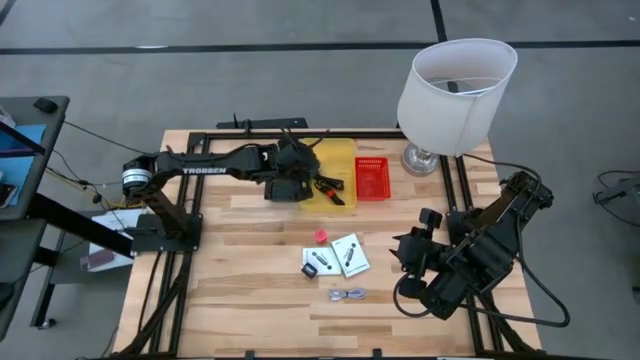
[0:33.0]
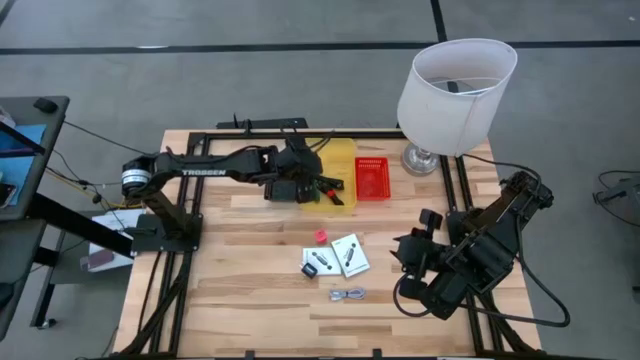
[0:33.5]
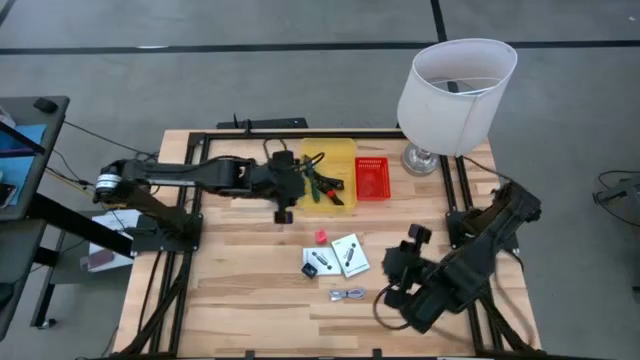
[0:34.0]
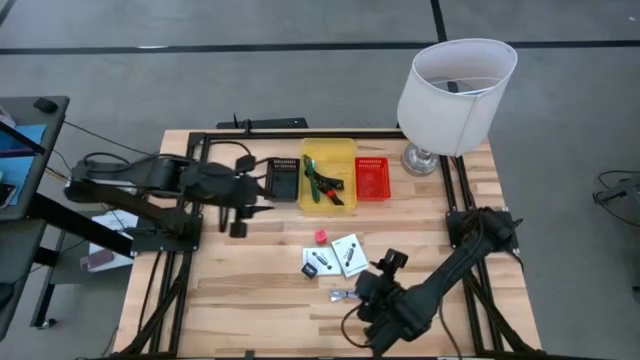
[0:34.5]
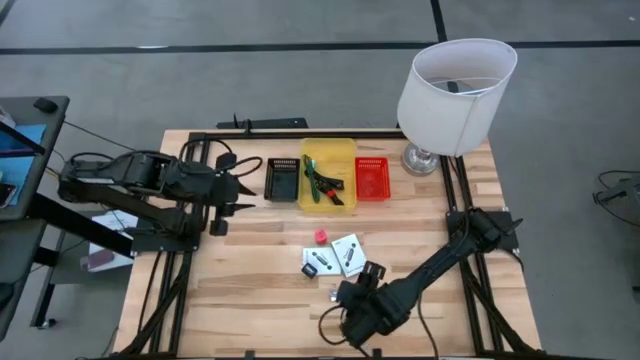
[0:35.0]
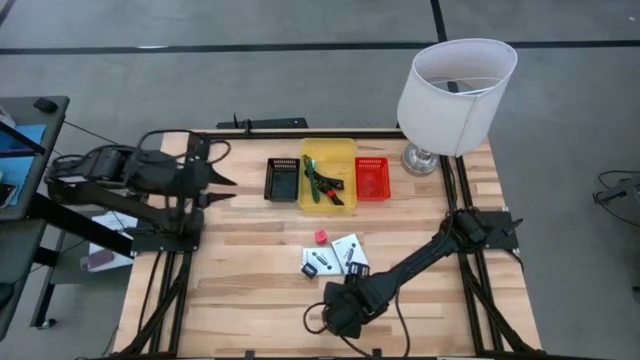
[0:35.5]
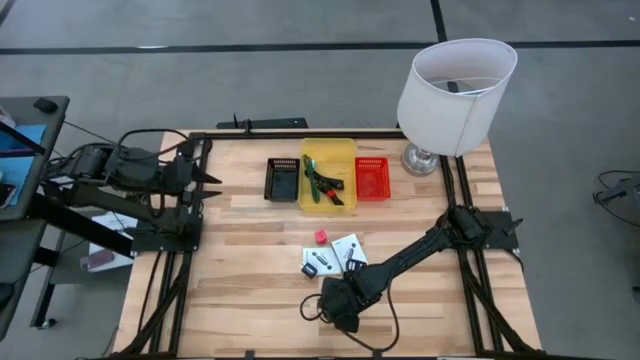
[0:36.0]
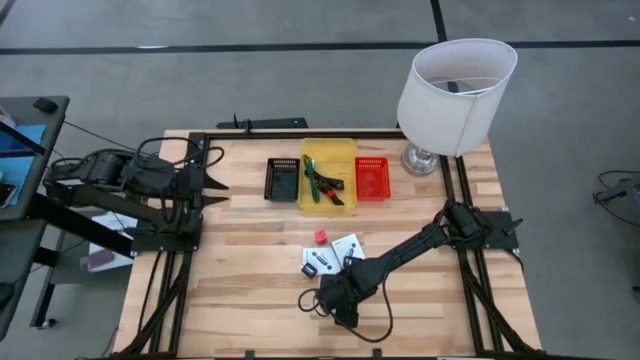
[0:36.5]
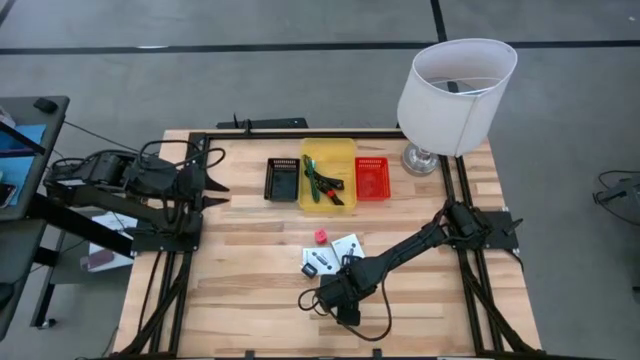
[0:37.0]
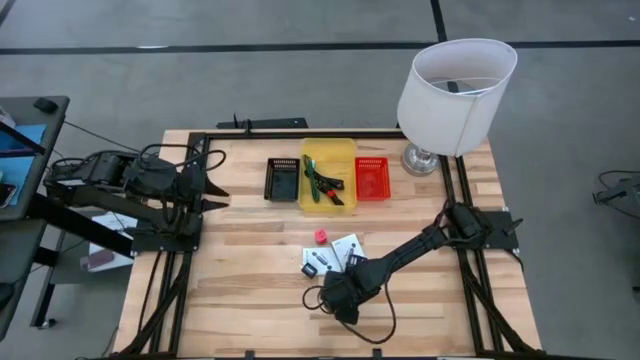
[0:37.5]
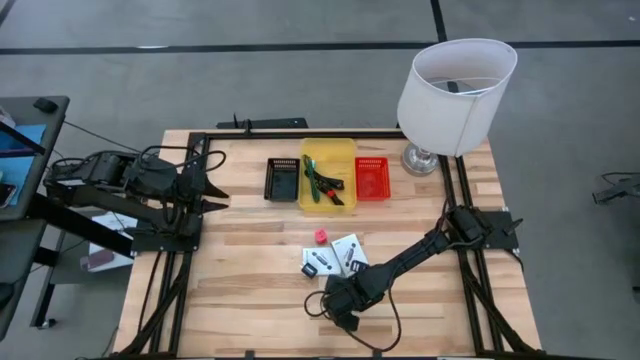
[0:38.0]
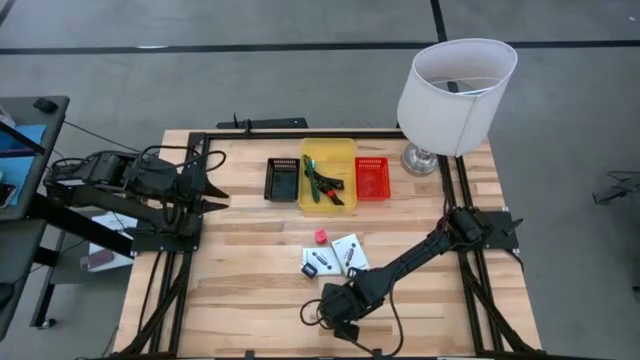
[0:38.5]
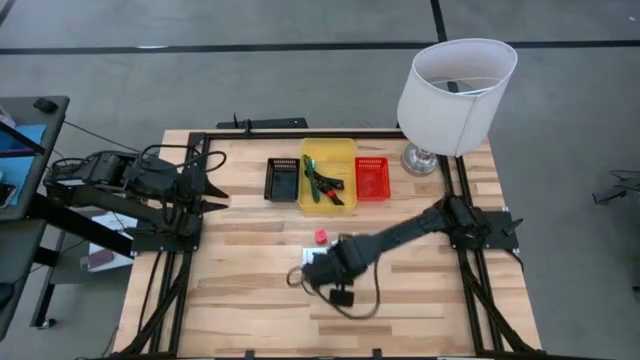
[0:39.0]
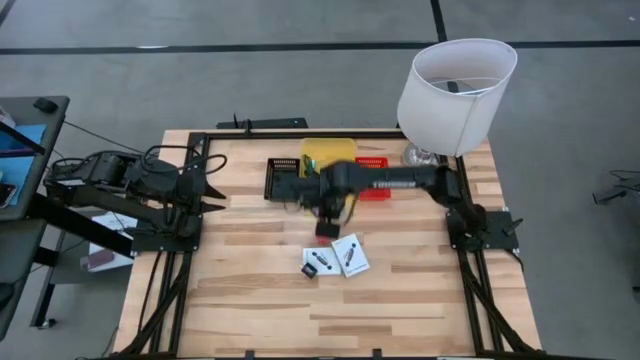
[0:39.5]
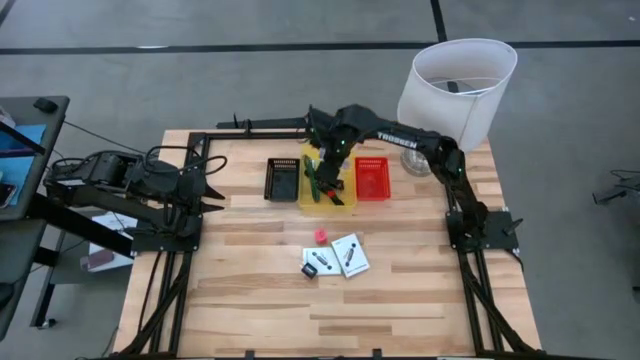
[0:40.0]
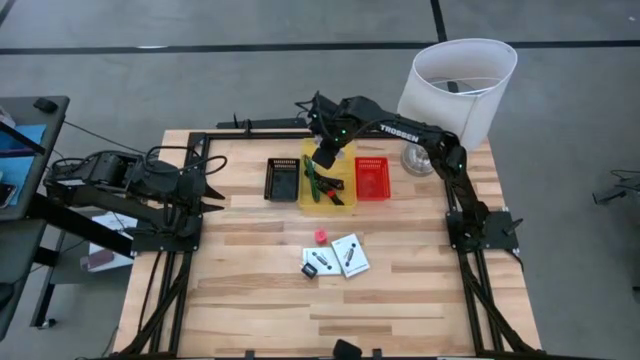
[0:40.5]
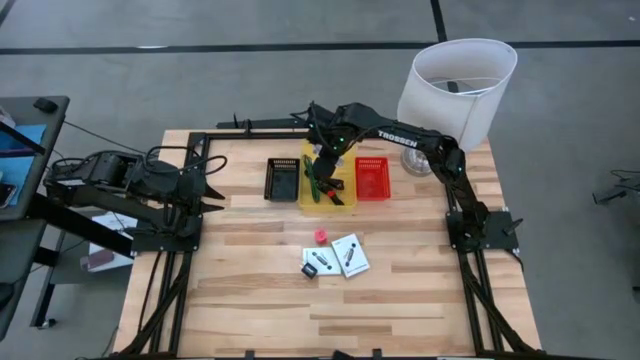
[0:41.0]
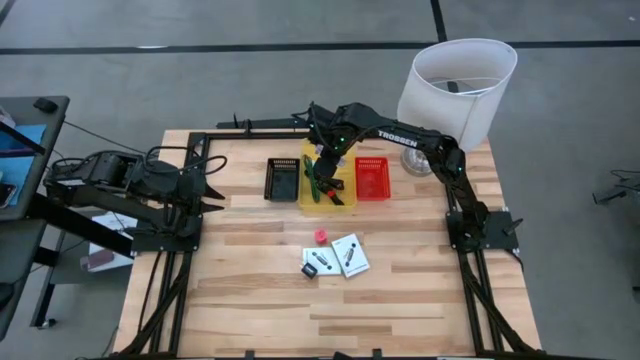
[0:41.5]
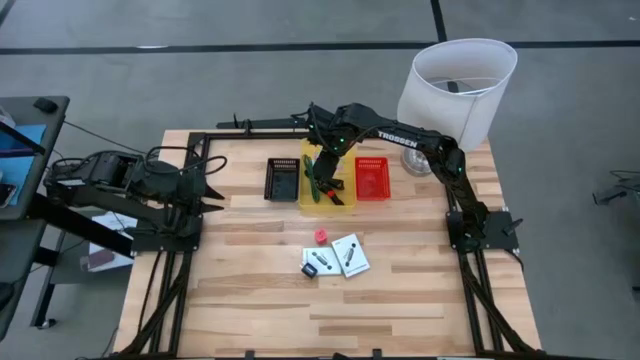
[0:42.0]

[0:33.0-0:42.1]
Task: Pick and place items into bin
Put the purple charger cable into the yellow bin

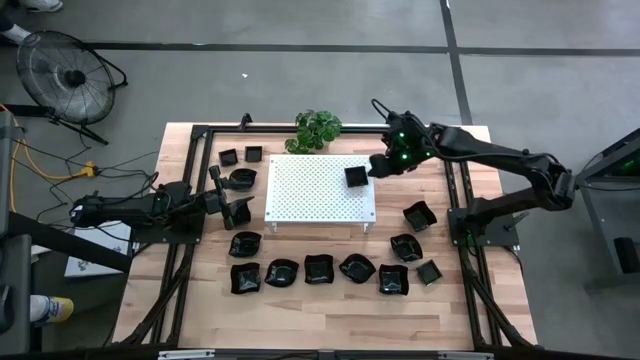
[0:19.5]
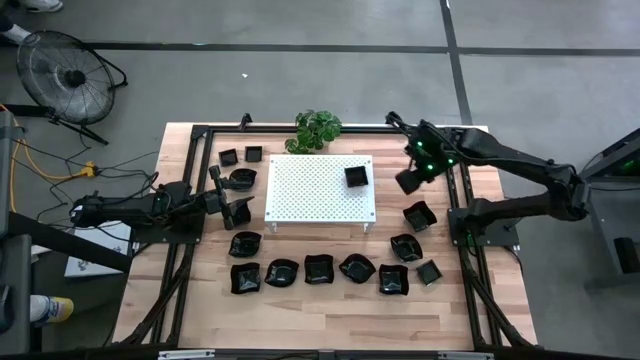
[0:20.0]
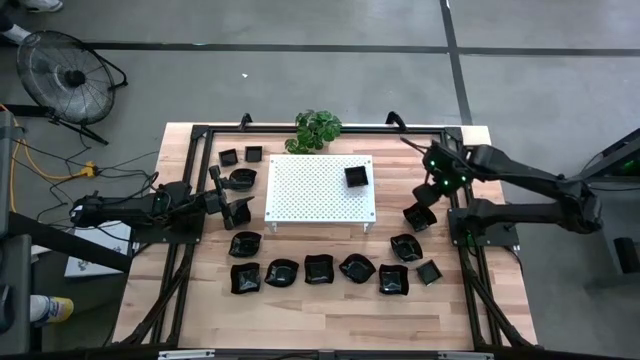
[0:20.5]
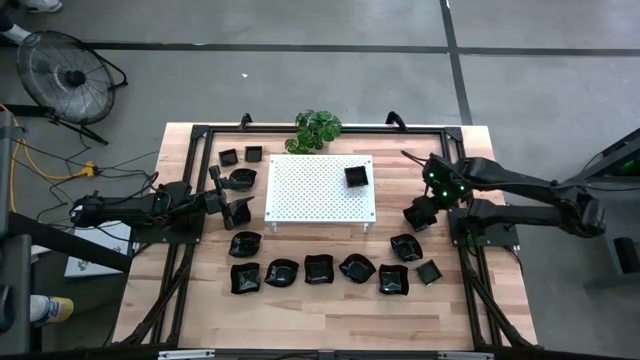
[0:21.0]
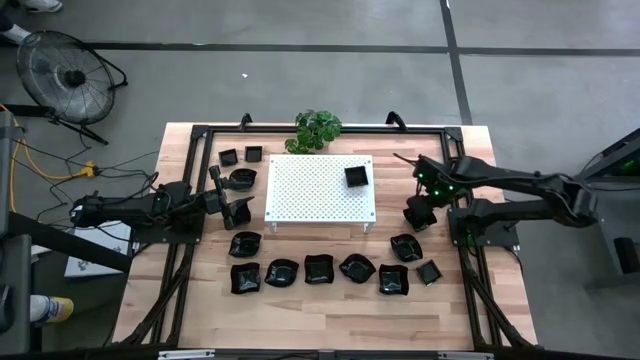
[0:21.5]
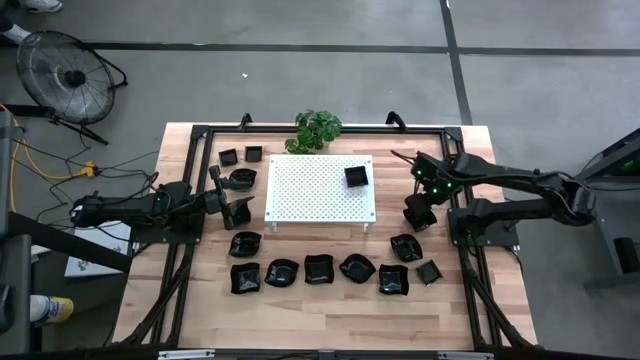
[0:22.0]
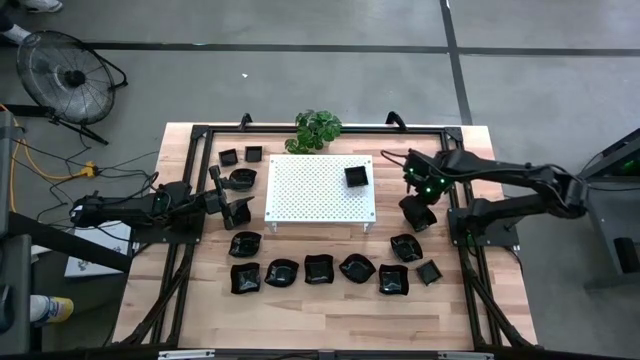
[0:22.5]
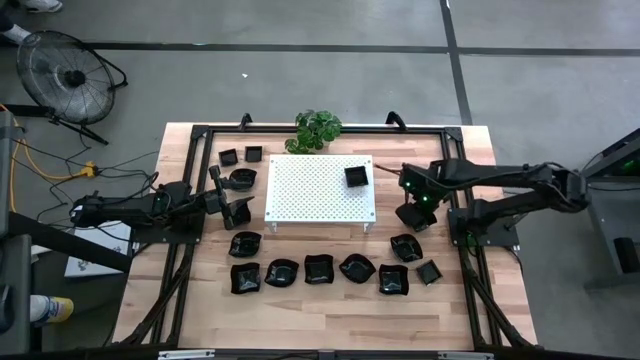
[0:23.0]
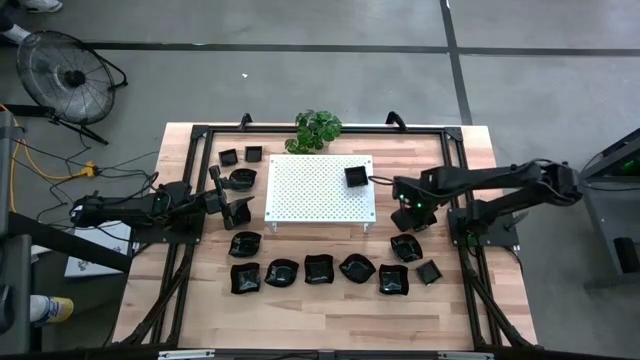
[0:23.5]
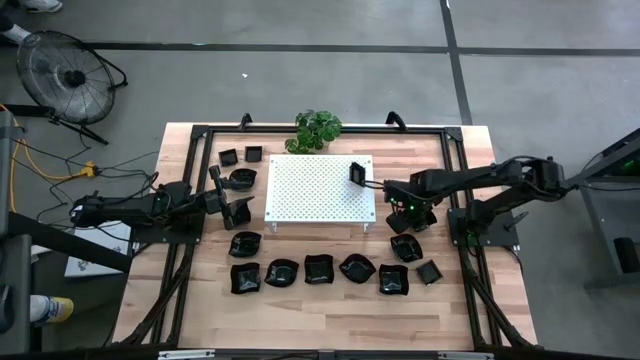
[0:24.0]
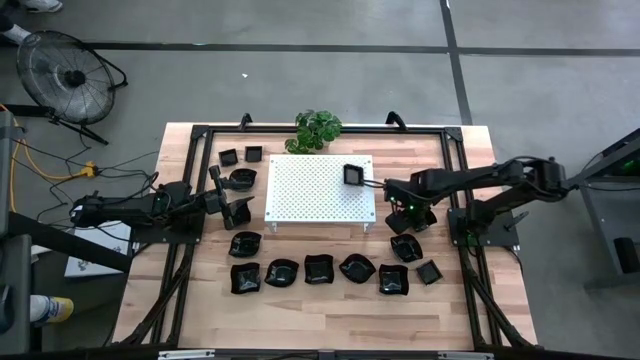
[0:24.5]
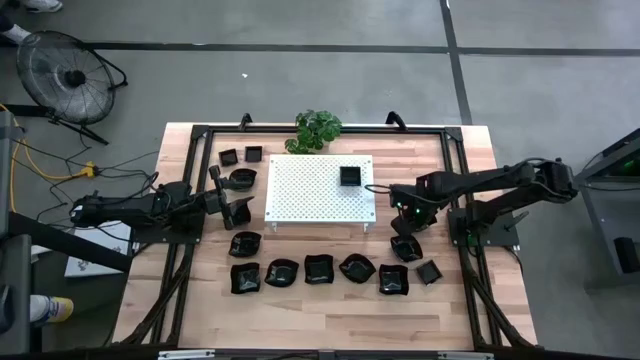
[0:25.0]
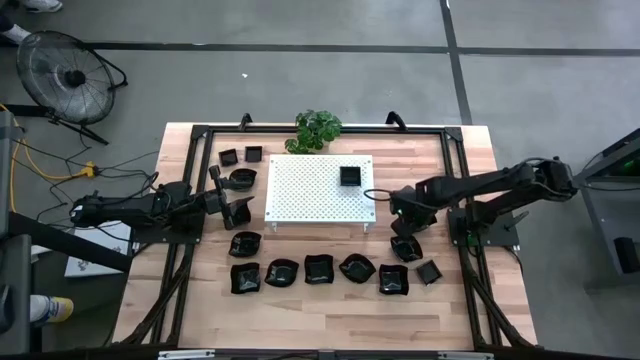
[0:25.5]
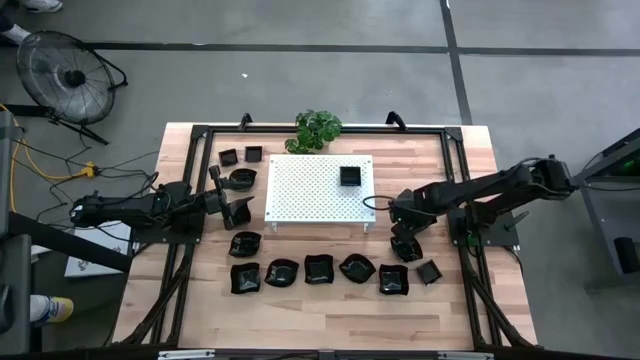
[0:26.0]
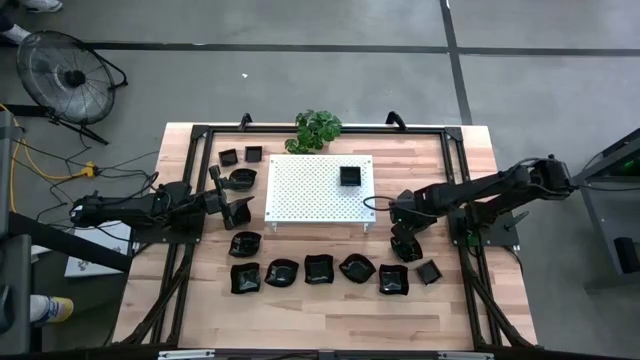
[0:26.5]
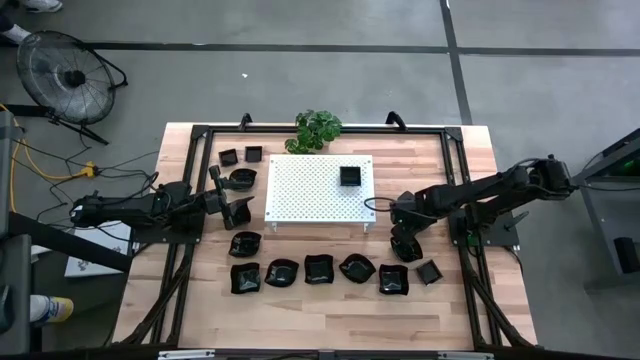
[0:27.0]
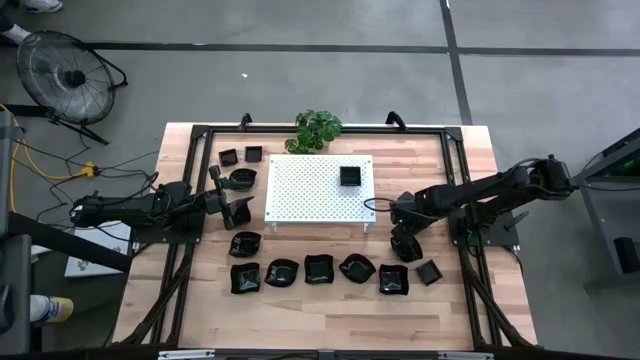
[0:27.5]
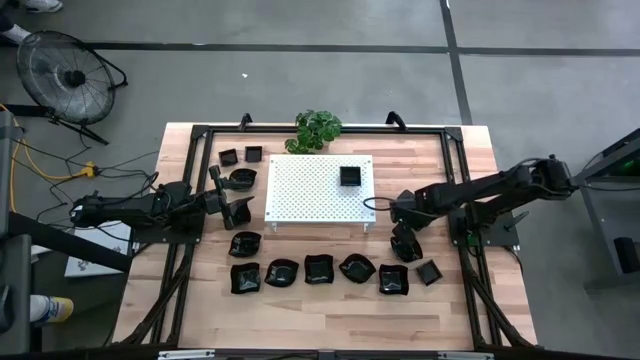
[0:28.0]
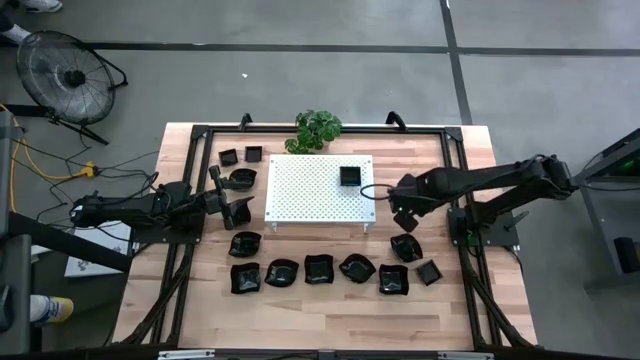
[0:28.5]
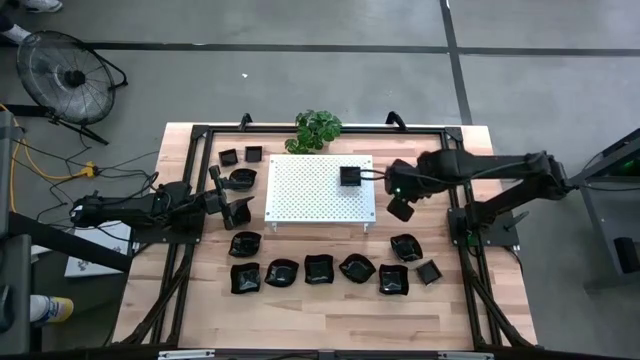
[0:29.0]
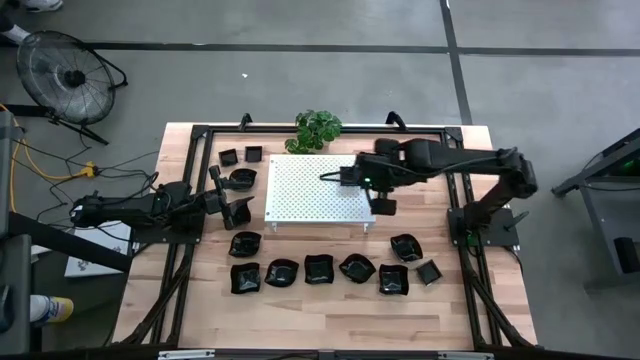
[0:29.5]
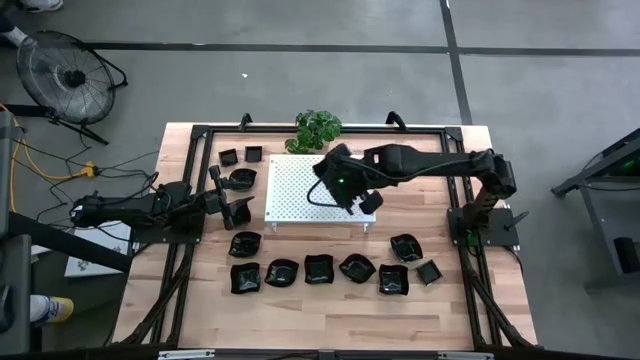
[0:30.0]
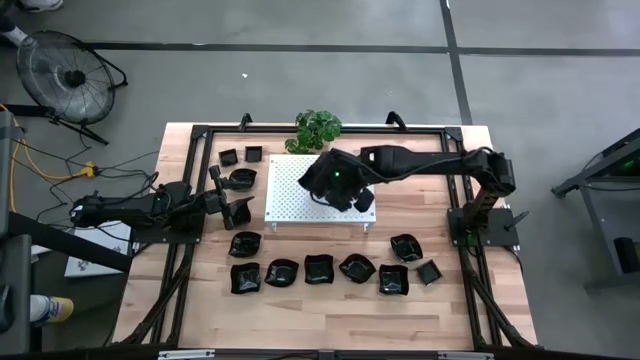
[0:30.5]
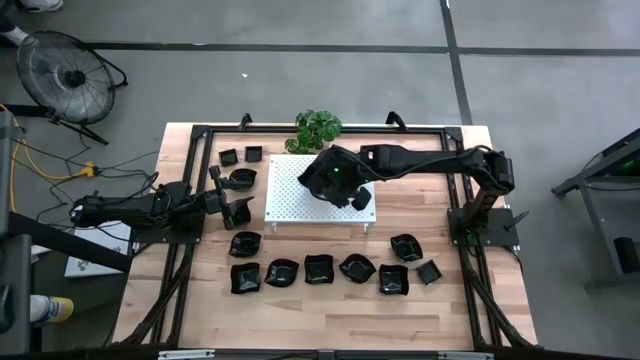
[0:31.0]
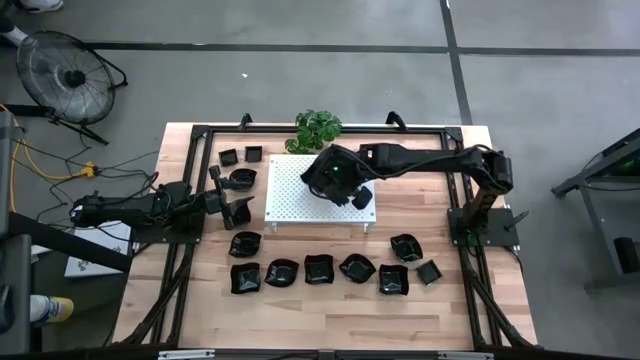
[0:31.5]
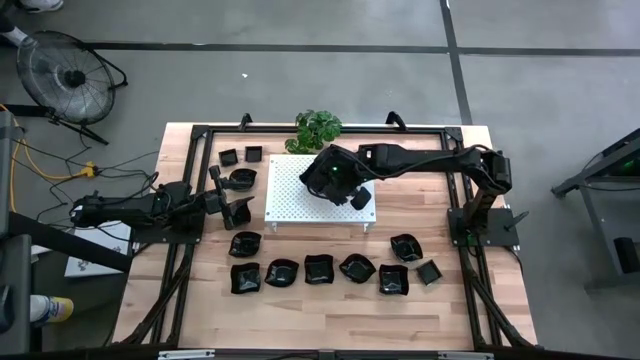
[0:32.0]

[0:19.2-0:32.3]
Task: Pick & Place Mini shaped plates
Put the distorted square plate on the shelf
